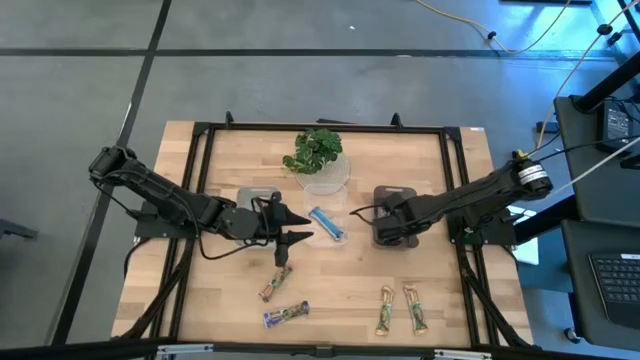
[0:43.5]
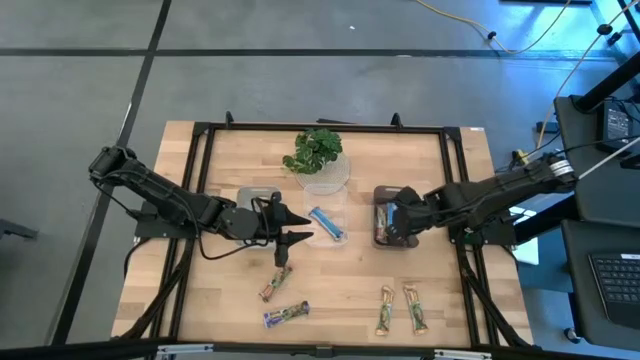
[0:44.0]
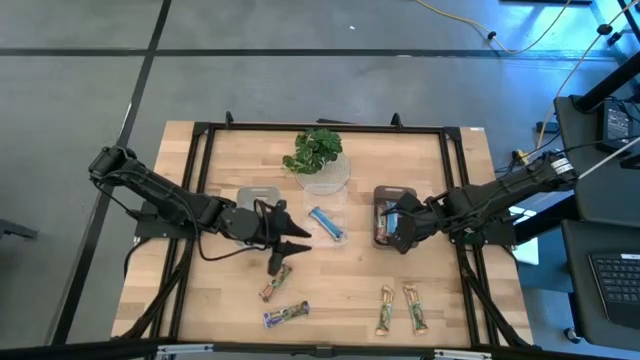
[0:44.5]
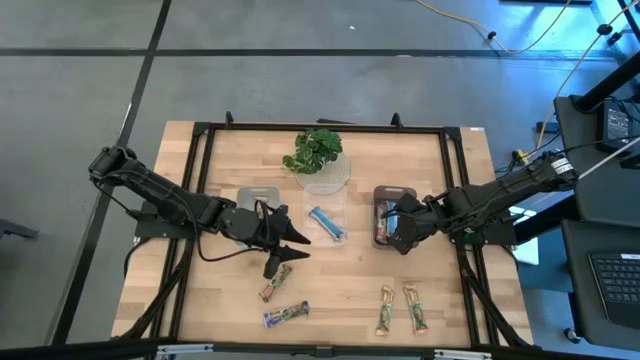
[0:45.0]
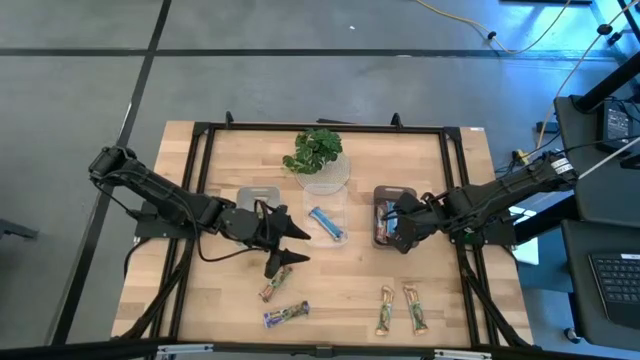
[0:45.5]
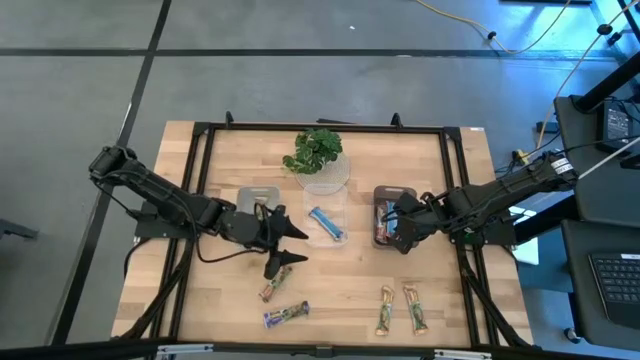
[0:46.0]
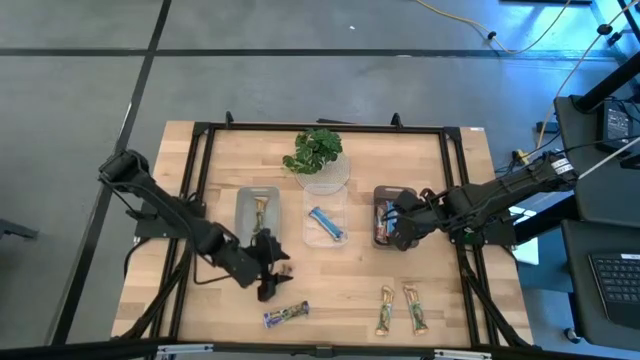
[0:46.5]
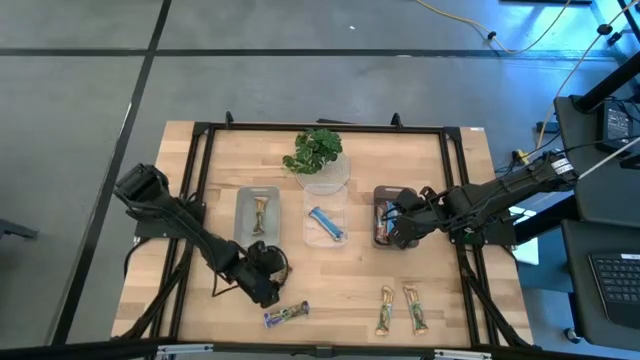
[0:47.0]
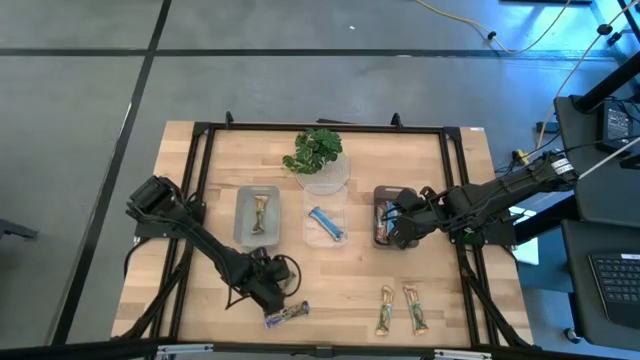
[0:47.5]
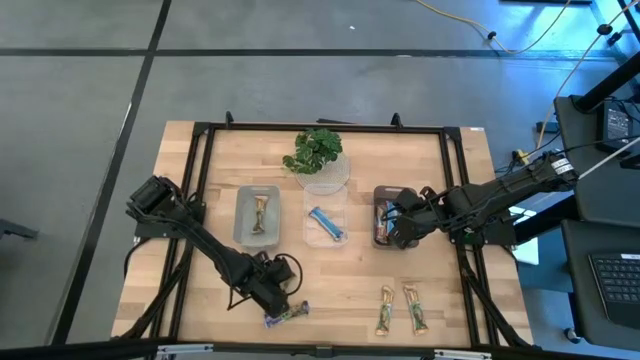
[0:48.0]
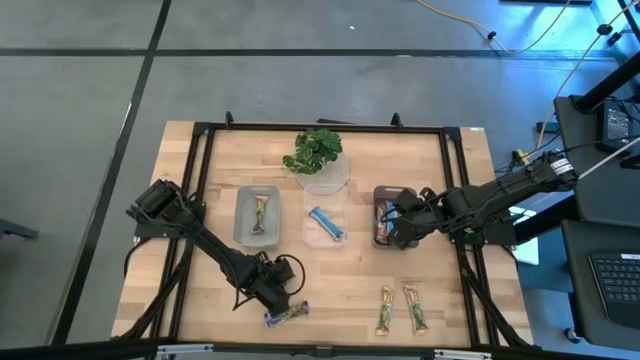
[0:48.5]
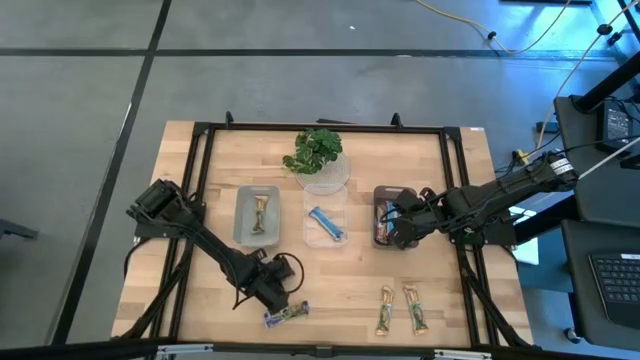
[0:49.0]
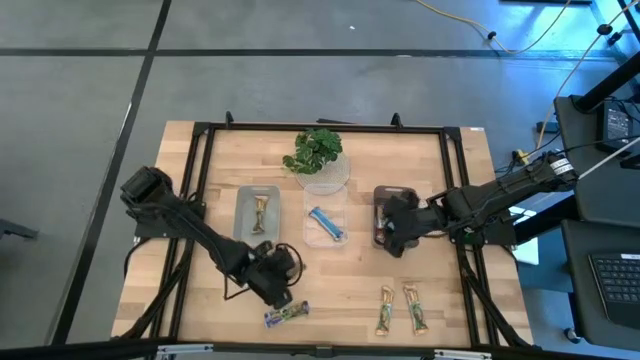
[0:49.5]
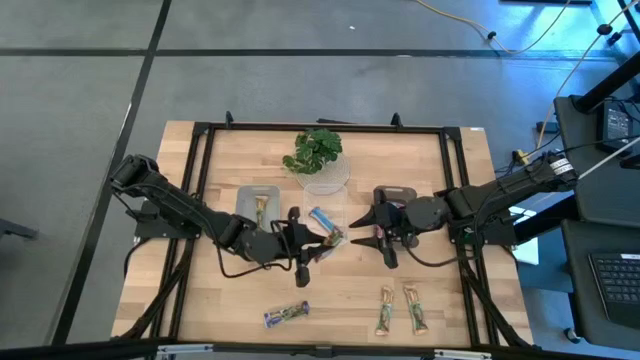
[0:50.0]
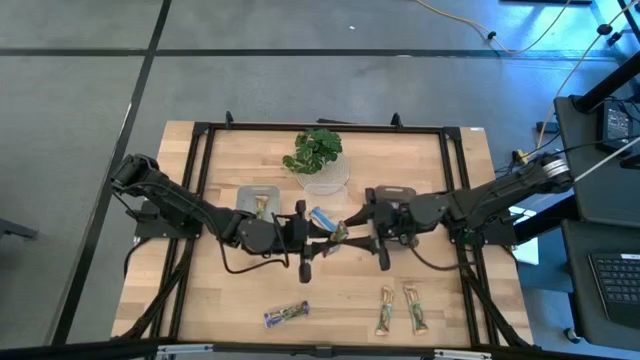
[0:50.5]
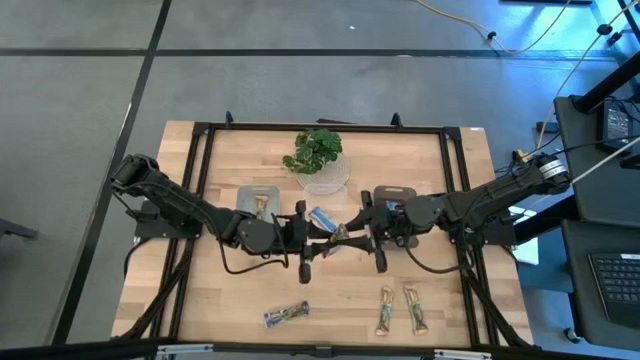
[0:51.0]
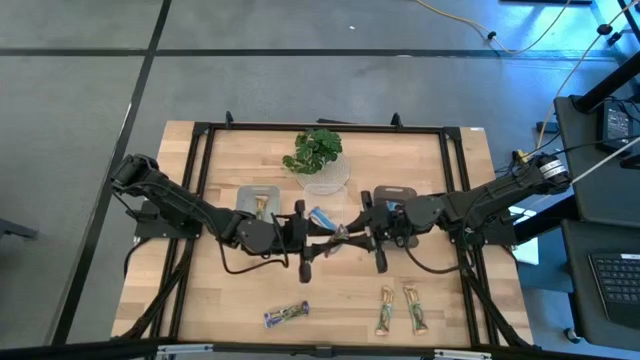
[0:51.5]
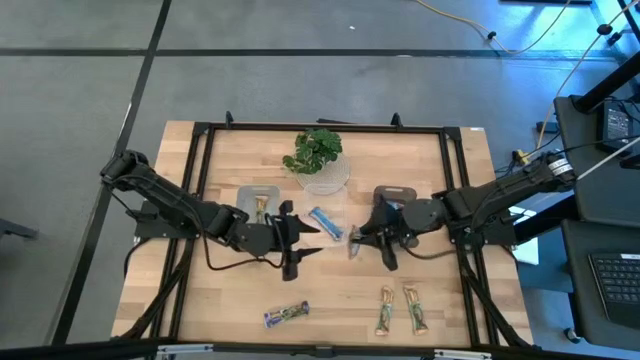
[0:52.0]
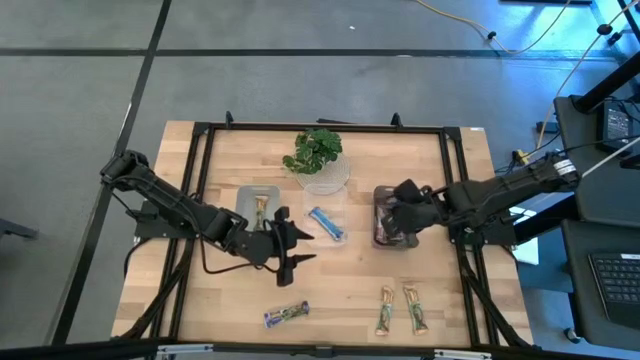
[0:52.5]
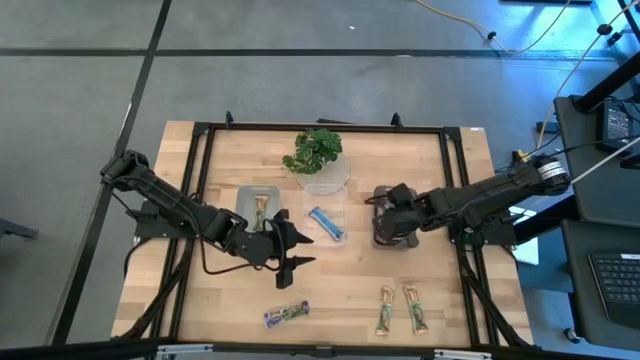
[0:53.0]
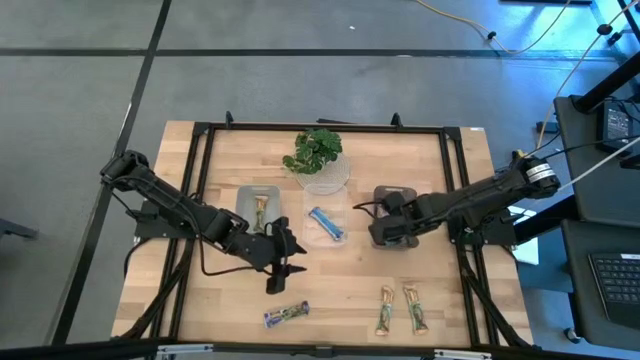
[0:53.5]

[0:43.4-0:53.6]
Task: Pick and place Granola Bars by type
Put the red granola bar into the black transparent bin

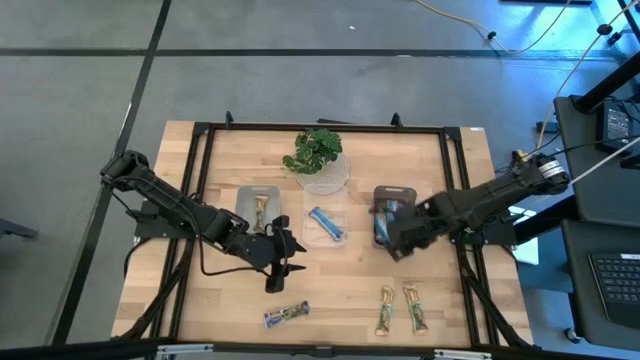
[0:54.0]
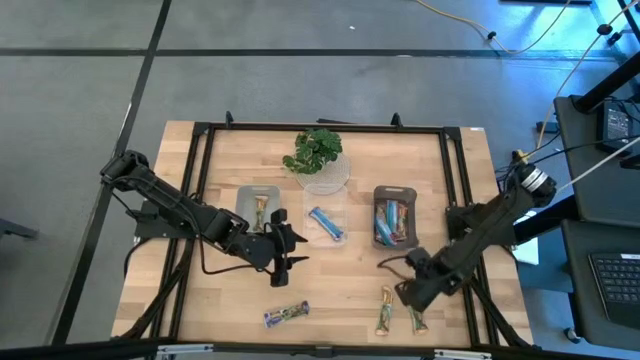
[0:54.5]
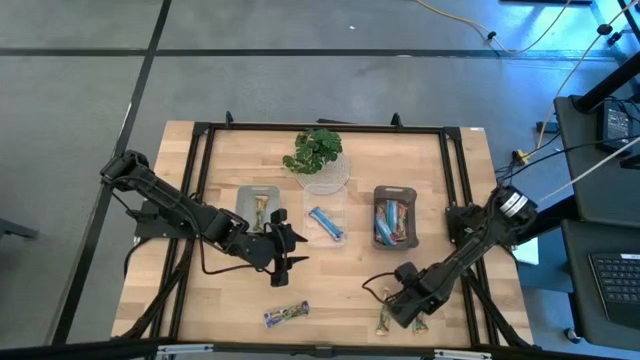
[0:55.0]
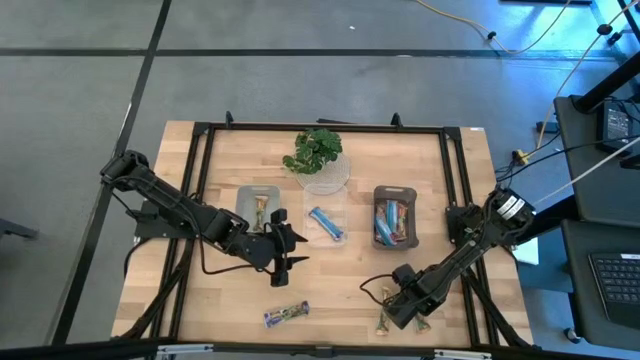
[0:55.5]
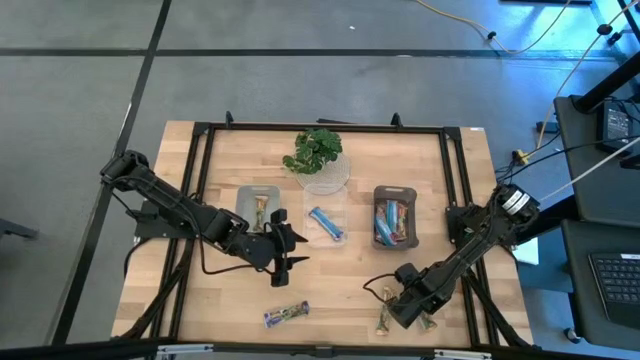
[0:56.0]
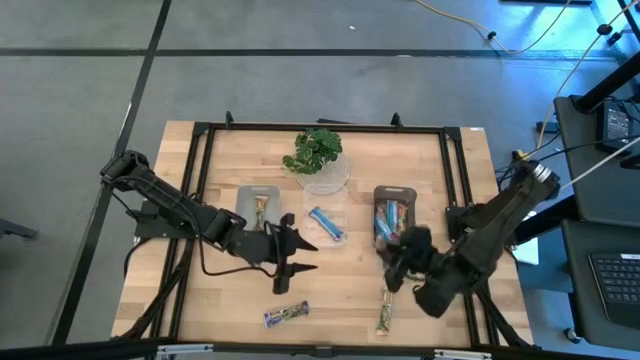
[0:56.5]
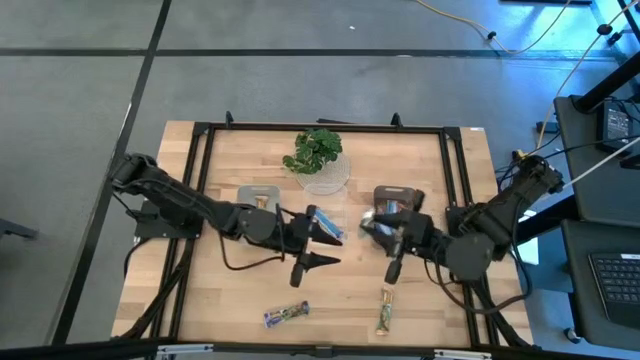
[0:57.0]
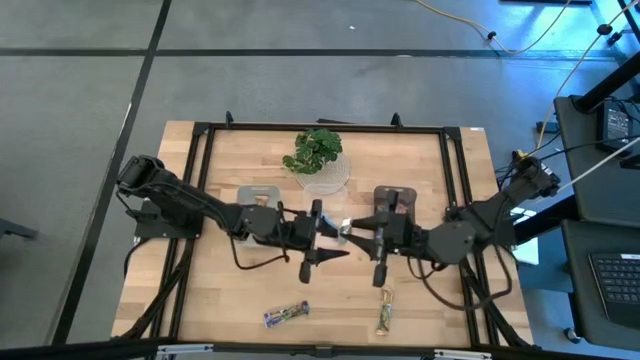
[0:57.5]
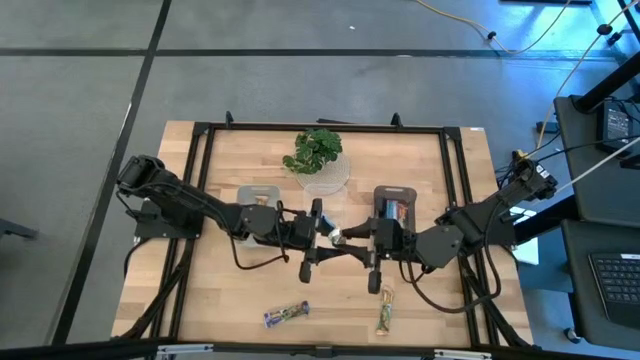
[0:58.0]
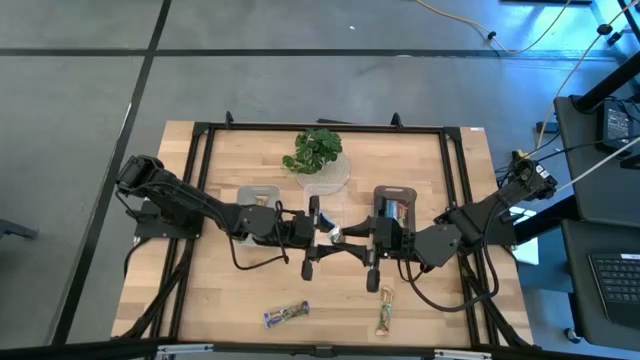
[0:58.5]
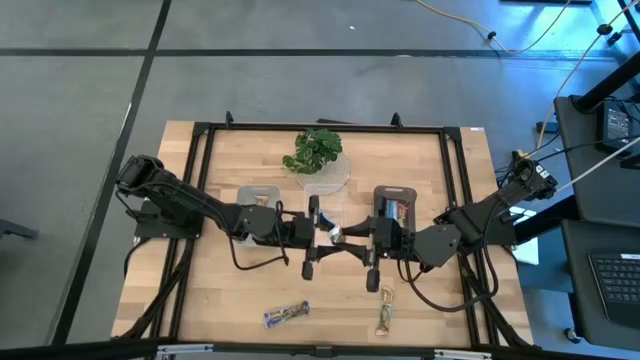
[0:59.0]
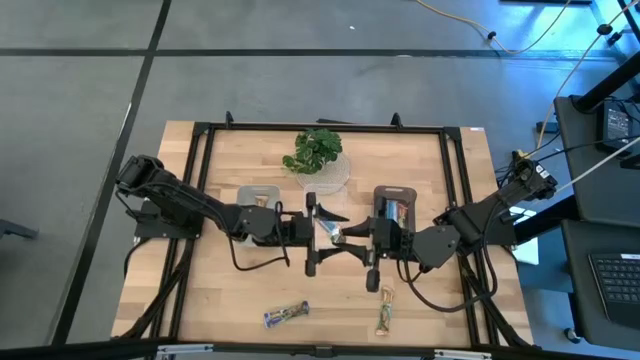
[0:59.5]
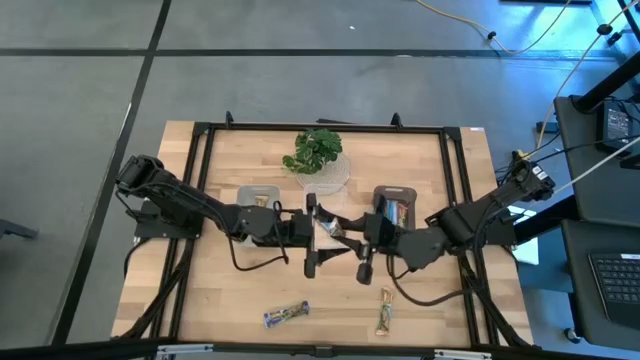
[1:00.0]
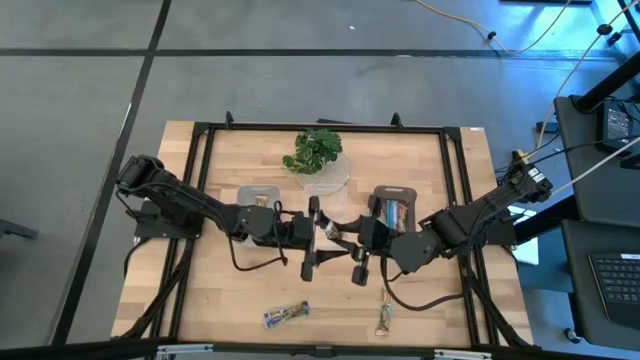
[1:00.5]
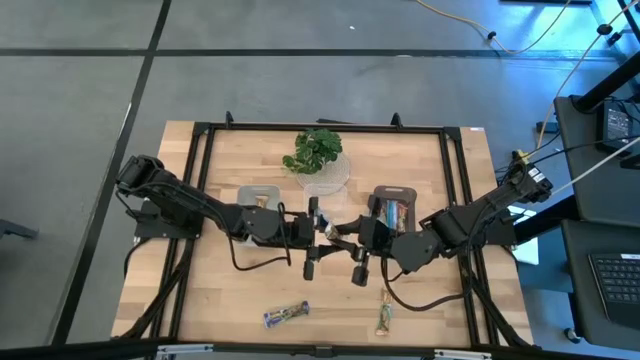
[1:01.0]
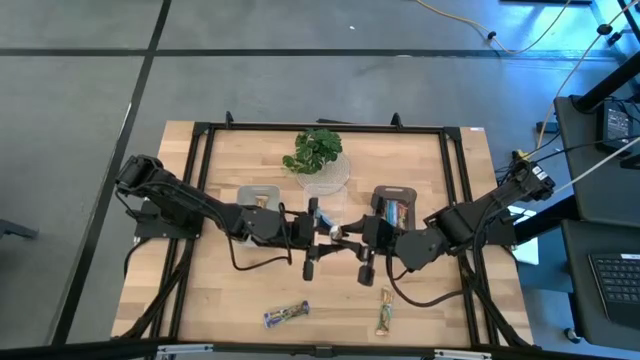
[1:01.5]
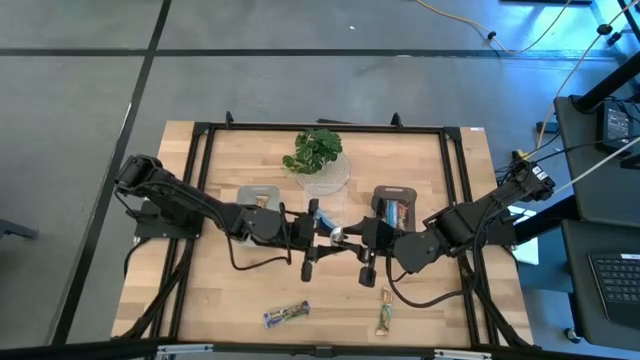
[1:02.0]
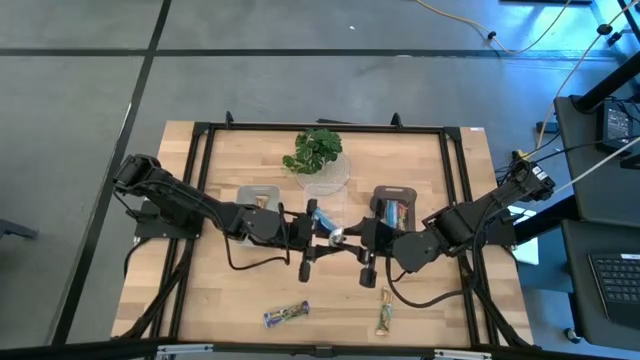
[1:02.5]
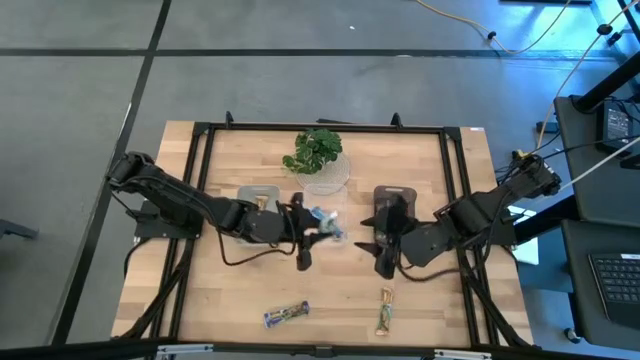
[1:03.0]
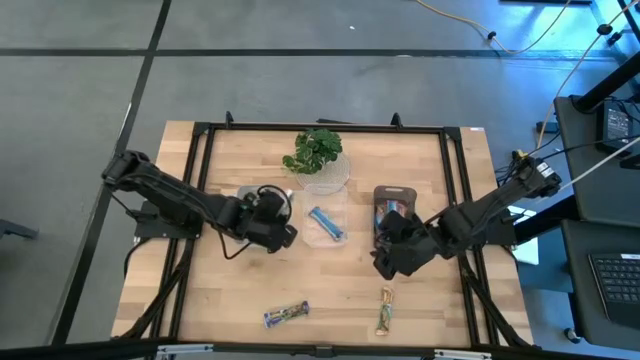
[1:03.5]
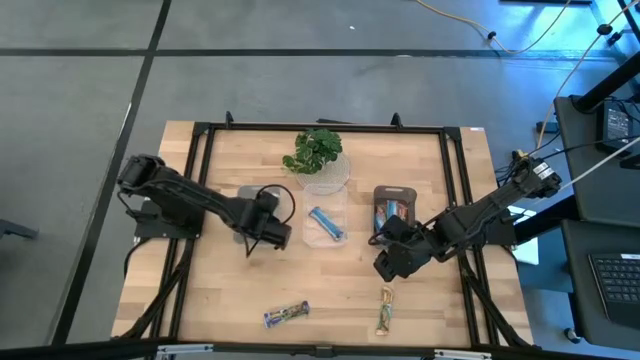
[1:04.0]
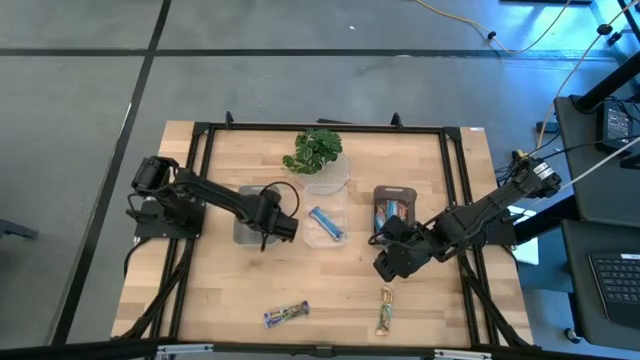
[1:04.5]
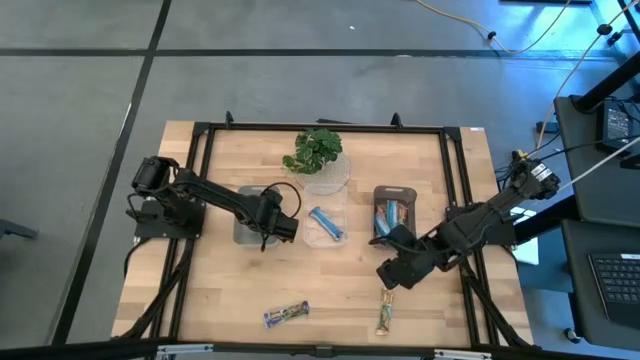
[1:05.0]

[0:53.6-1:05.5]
Put the right yellow granola bar into the gray bin
